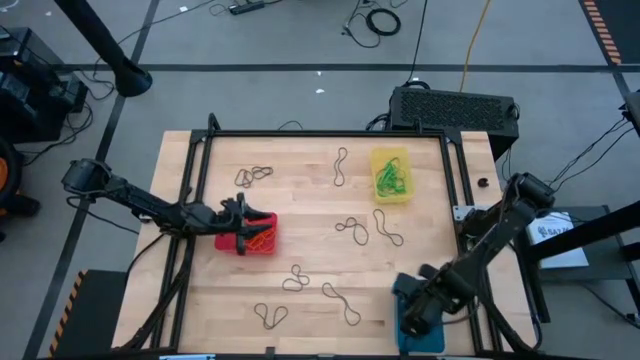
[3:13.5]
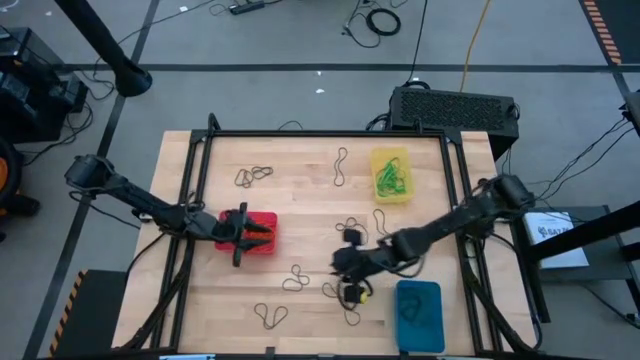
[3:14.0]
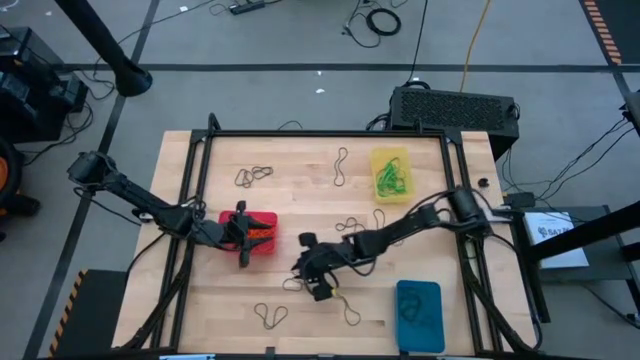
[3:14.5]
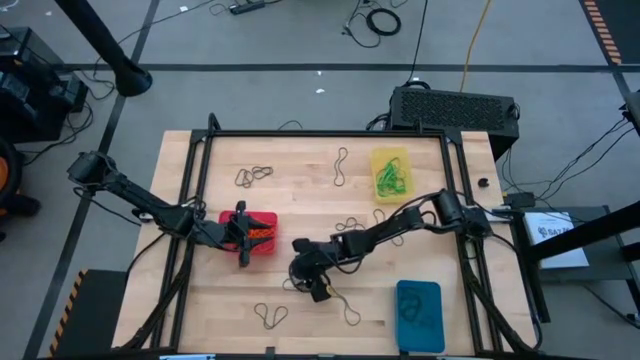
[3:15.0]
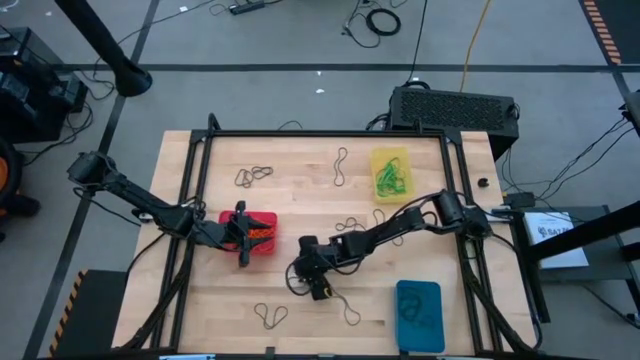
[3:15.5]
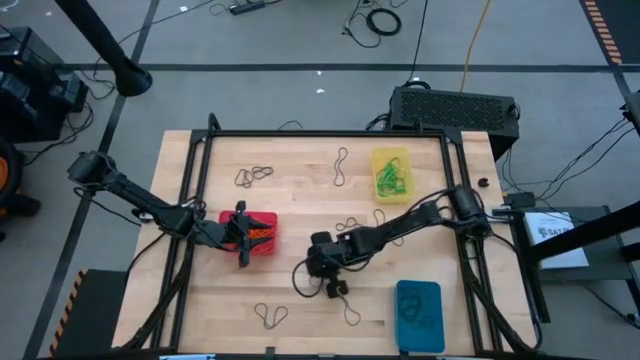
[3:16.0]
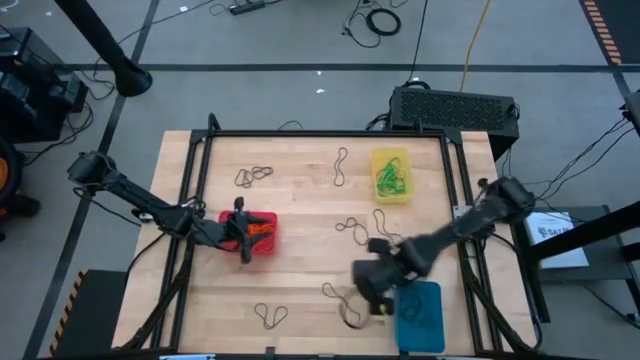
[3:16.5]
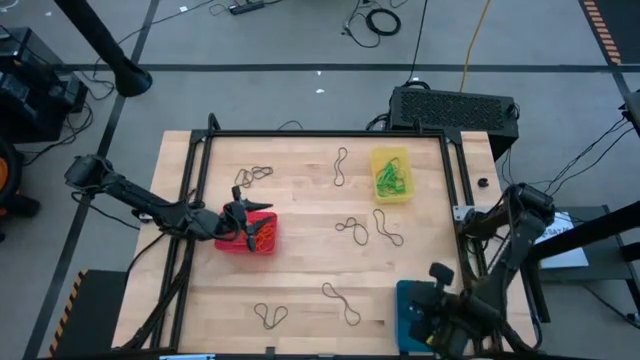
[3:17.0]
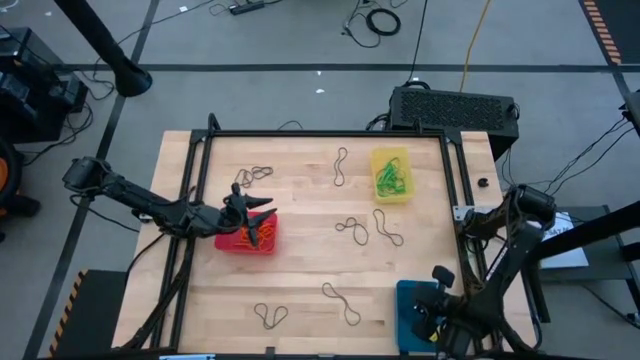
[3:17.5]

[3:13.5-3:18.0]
Task: Sort rubber bands into baskets
Put the violet rubber band into the blue bin

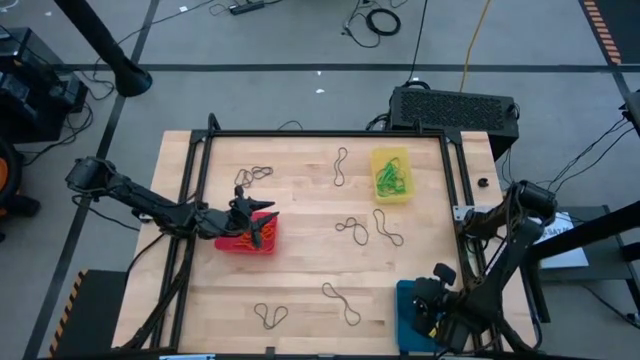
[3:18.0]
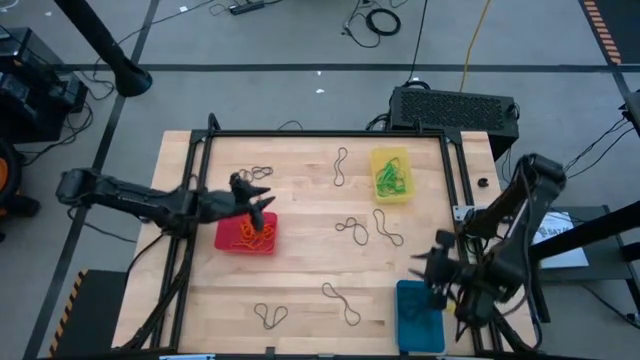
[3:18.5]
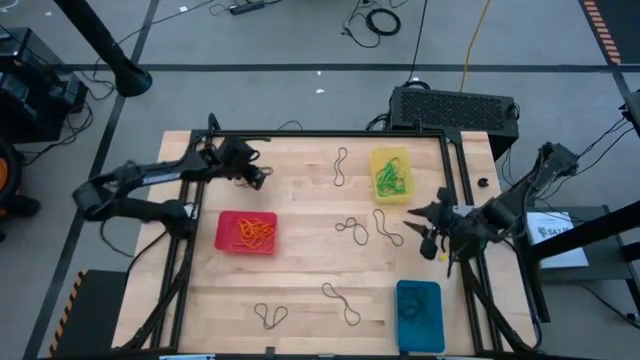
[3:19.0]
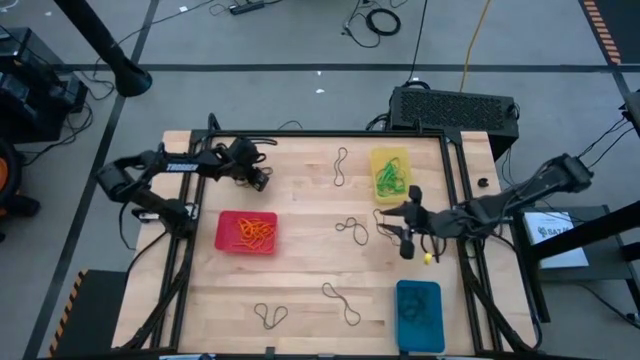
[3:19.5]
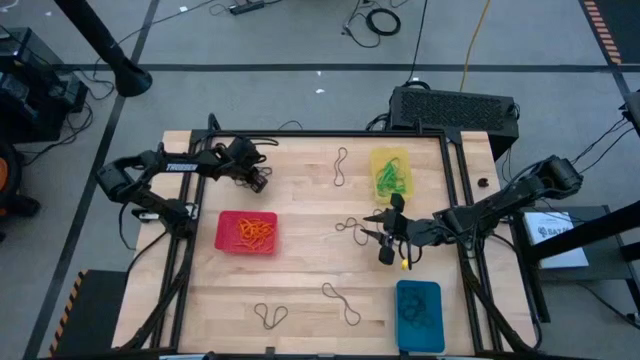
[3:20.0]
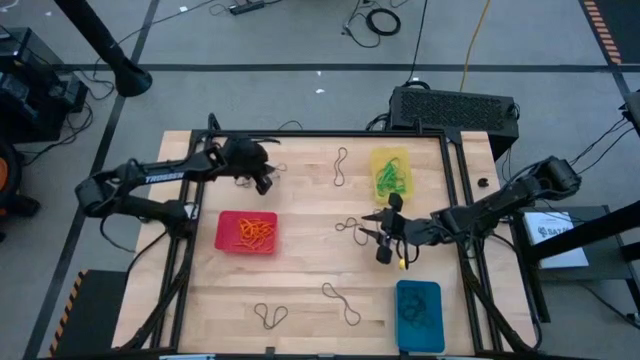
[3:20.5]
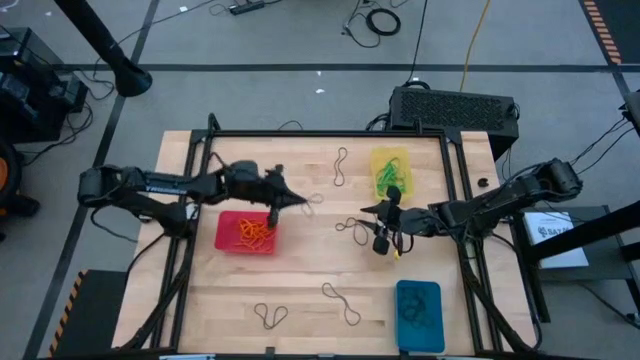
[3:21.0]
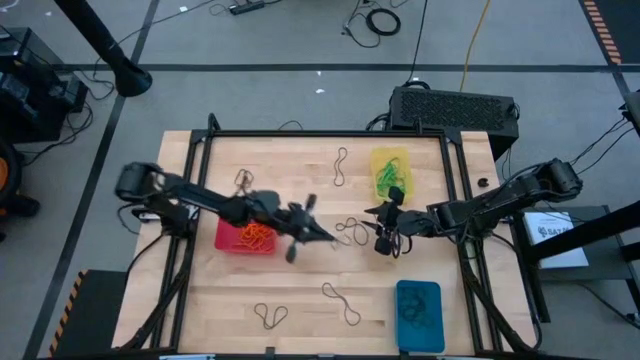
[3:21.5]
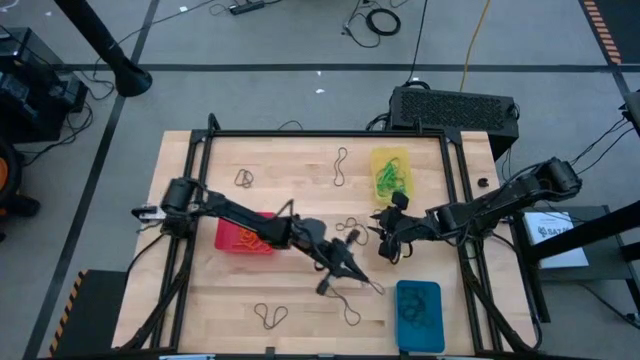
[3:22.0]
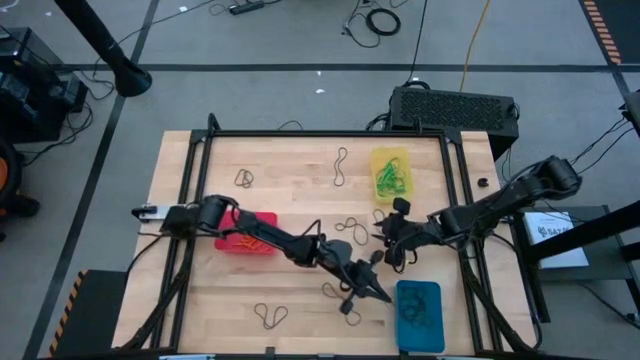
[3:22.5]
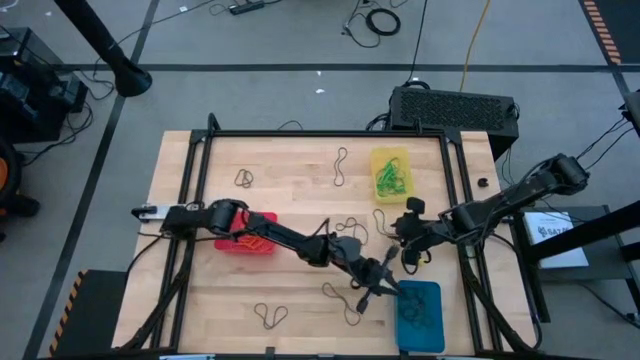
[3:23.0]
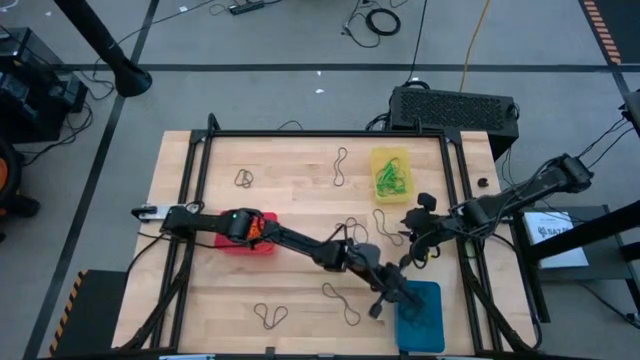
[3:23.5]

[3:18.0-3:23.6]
Put the violet rubber band into the blue bin

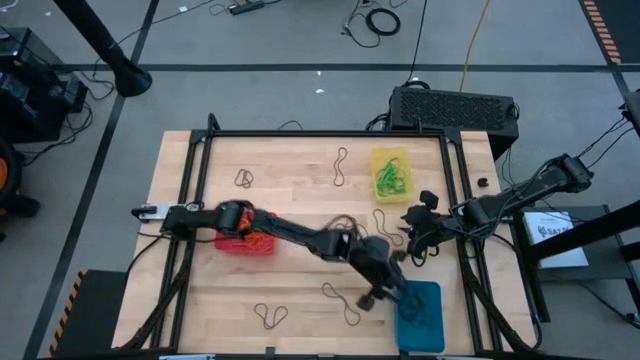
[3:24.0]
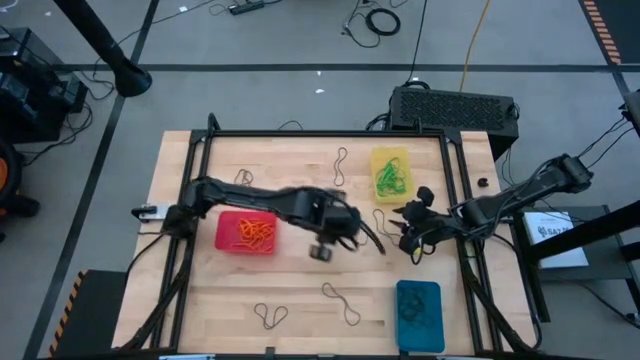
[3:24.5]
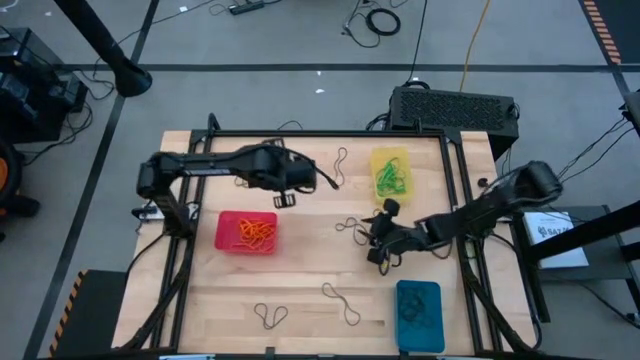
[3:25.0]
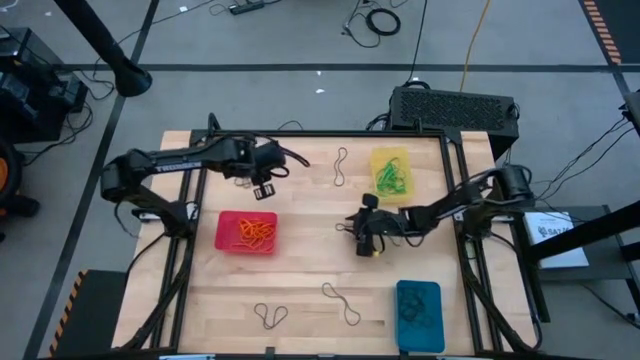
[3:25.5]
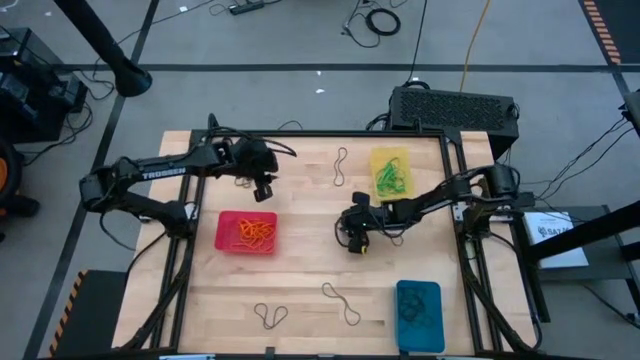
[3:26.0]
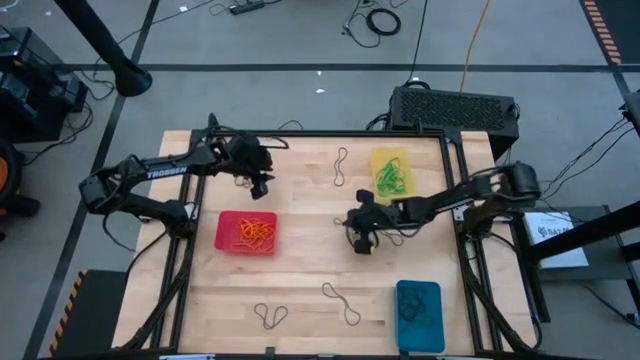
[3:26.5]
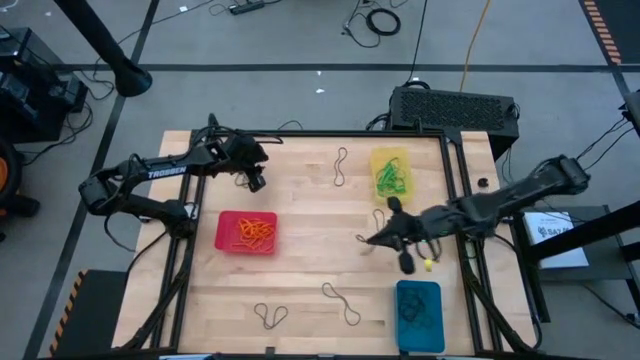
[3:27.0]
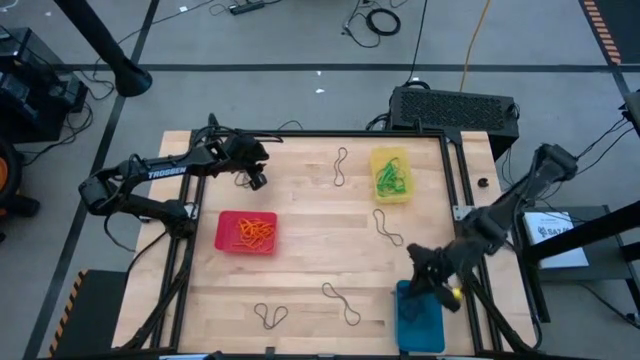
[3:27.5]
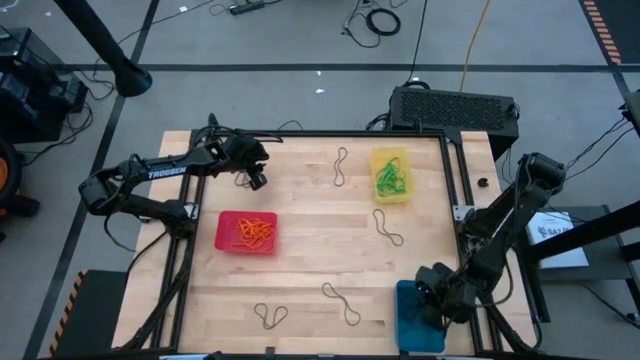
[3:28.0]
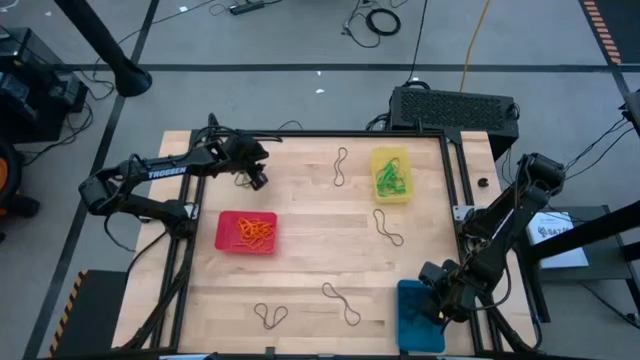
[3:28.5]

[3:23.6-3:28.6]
Put the violet rubber band into the blue bin

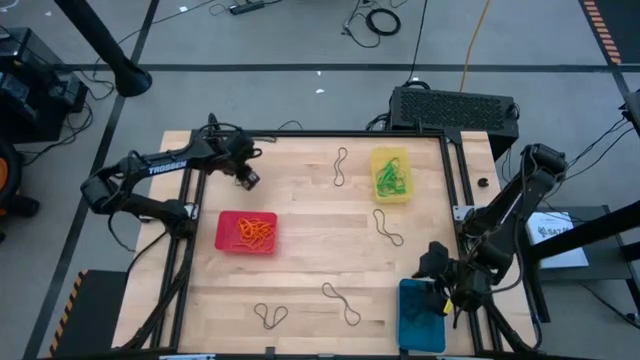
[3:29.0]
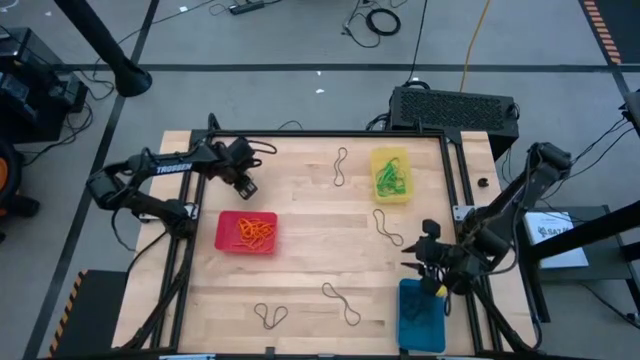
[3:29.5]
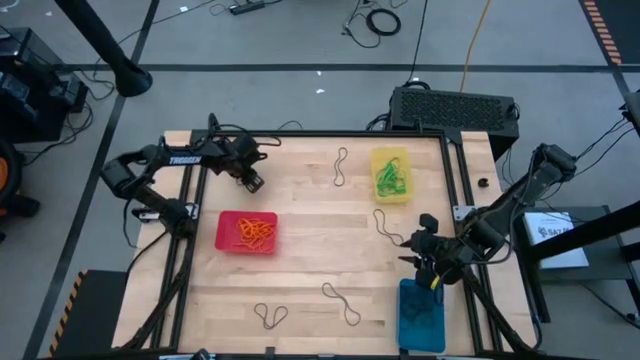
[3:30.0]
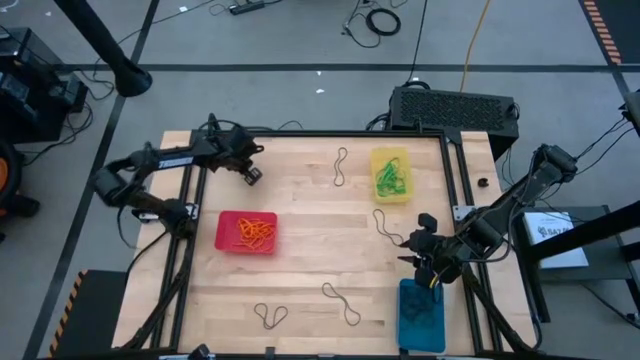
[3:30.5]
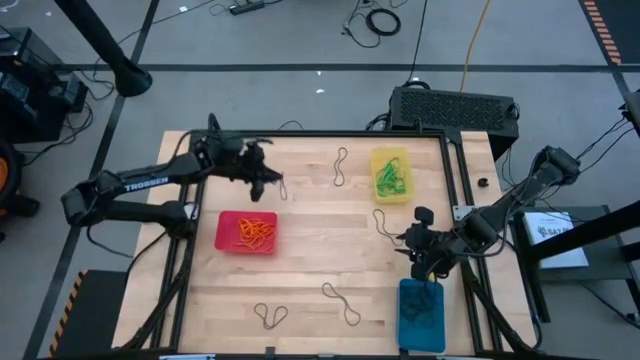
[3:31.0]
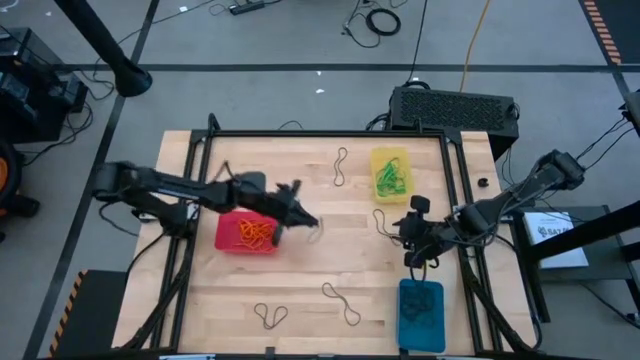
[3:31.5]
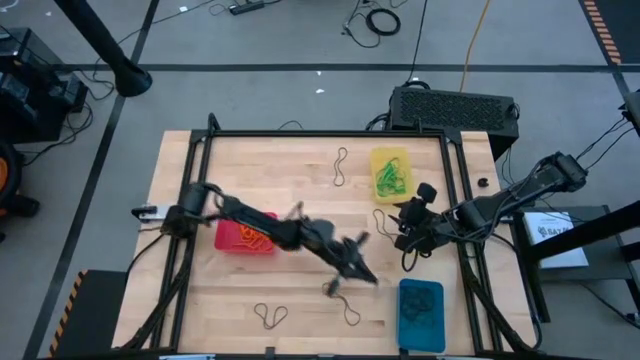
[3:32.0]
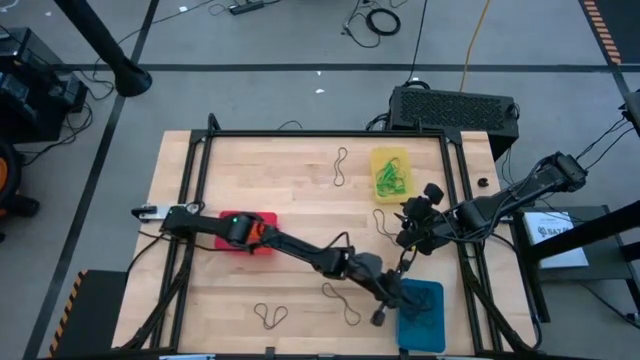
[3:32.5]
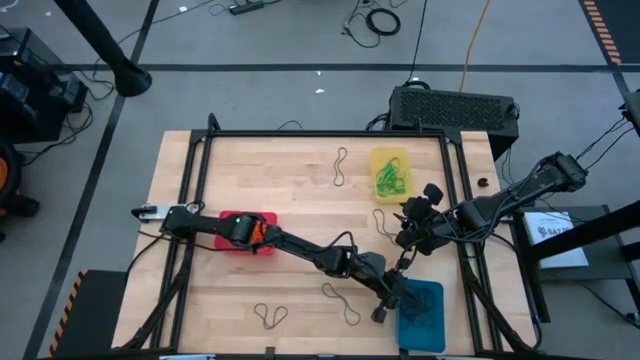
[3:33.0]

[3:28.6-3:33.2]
Put the violet rubber band into the blue bin
